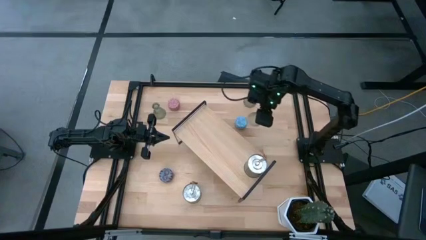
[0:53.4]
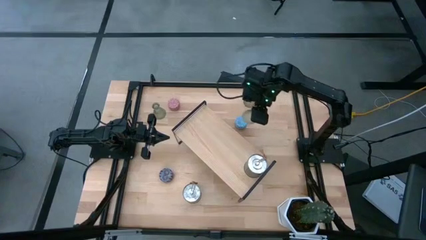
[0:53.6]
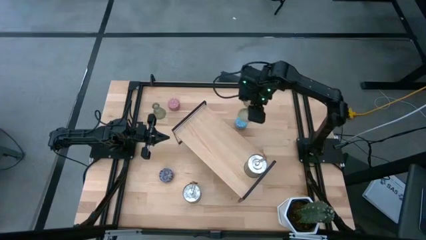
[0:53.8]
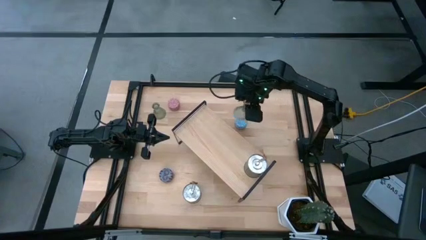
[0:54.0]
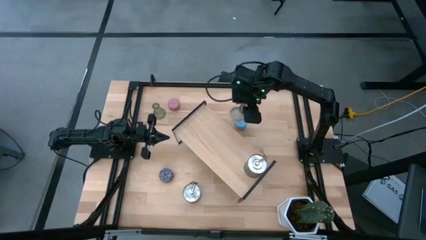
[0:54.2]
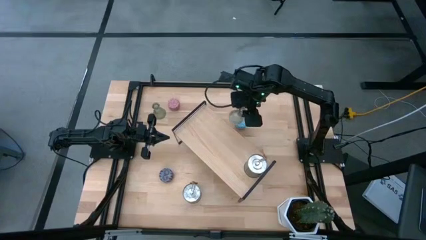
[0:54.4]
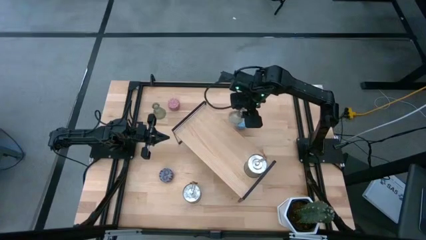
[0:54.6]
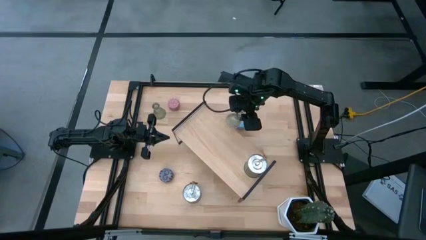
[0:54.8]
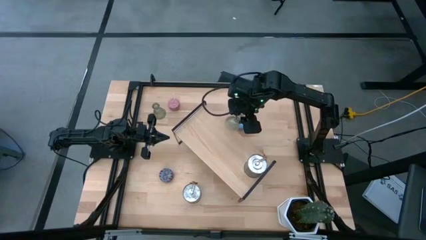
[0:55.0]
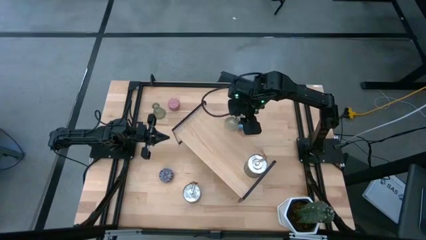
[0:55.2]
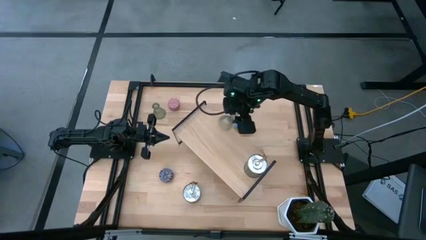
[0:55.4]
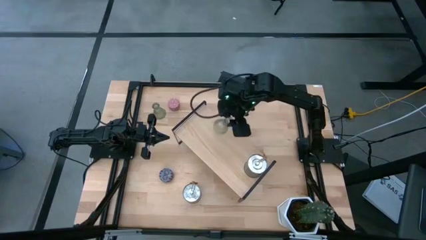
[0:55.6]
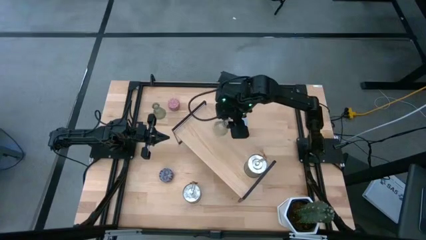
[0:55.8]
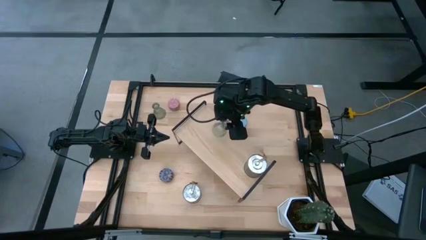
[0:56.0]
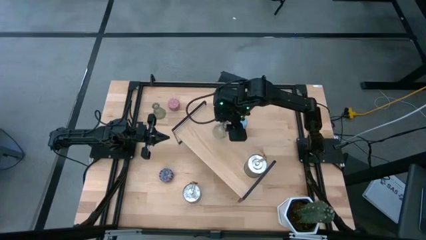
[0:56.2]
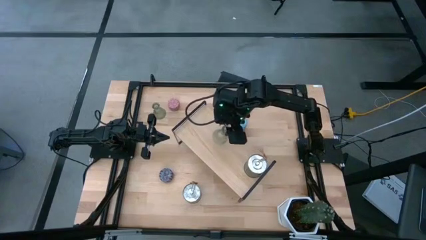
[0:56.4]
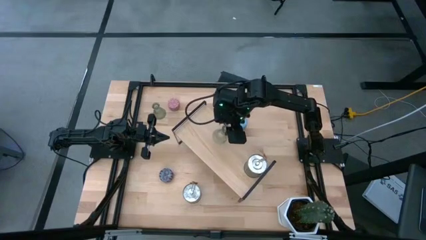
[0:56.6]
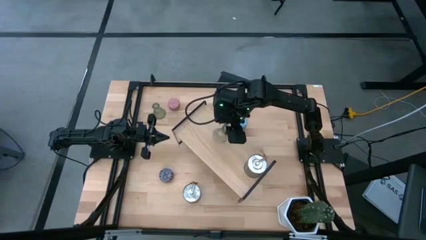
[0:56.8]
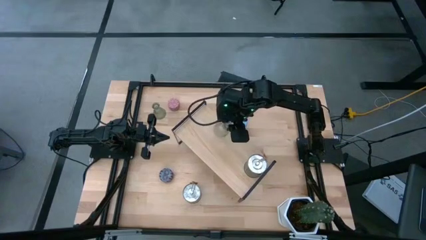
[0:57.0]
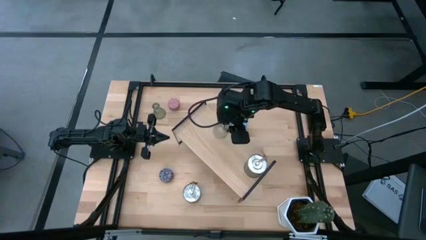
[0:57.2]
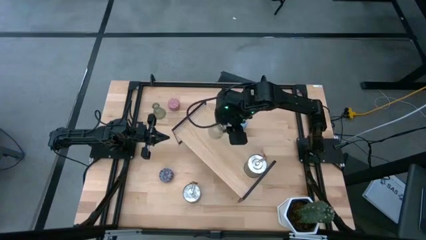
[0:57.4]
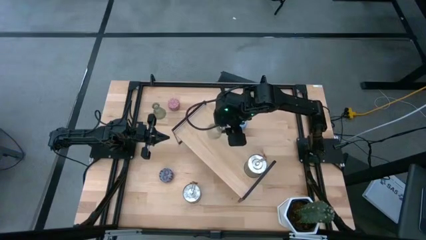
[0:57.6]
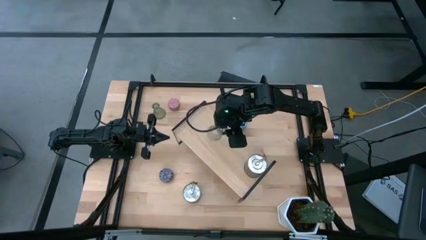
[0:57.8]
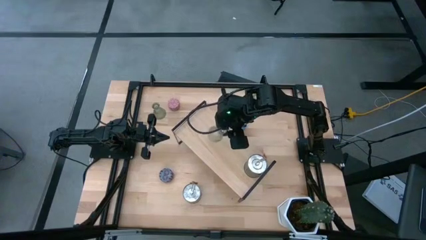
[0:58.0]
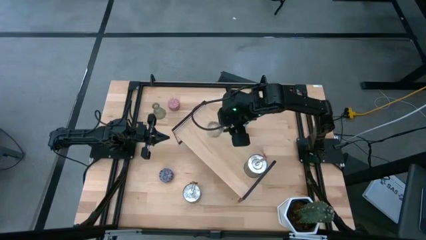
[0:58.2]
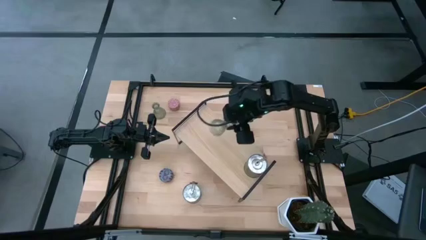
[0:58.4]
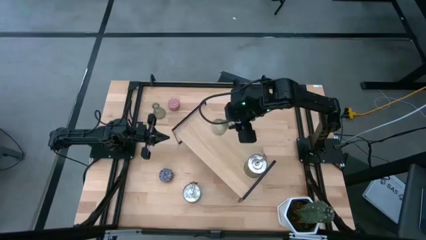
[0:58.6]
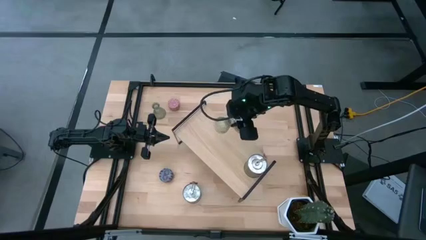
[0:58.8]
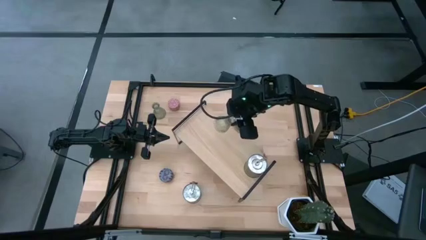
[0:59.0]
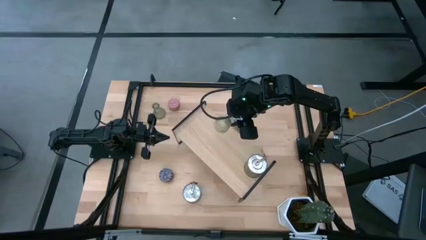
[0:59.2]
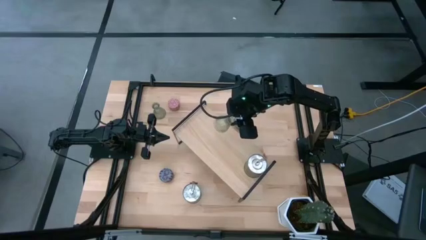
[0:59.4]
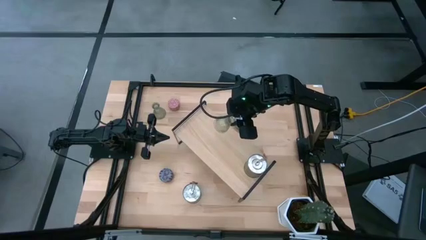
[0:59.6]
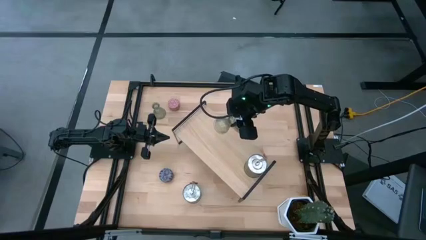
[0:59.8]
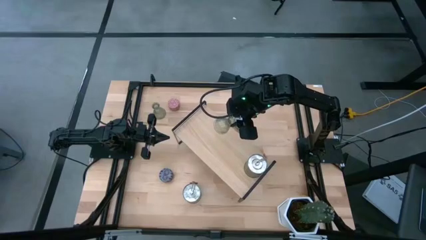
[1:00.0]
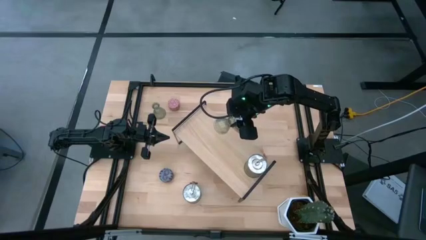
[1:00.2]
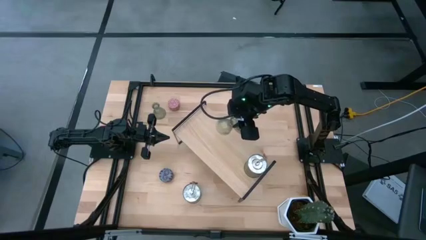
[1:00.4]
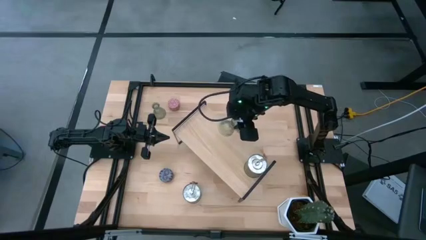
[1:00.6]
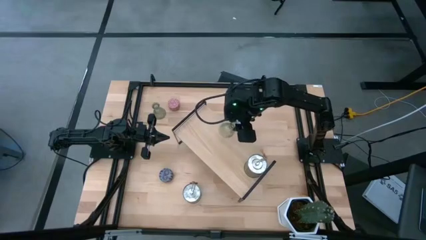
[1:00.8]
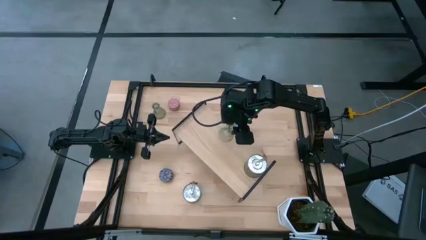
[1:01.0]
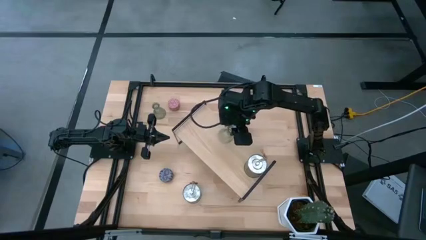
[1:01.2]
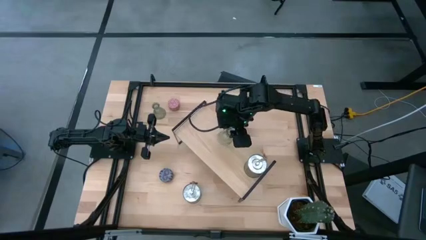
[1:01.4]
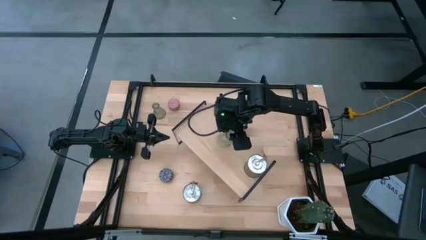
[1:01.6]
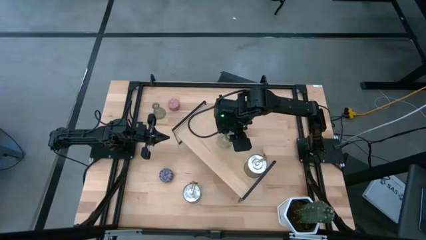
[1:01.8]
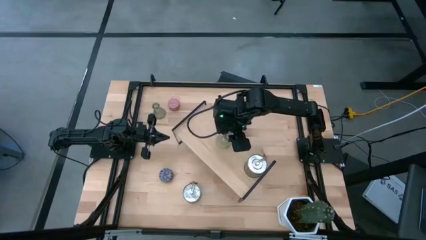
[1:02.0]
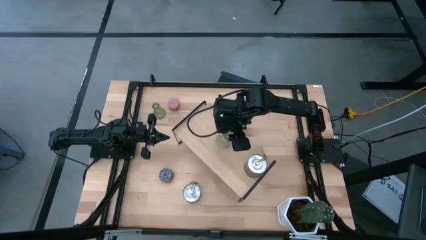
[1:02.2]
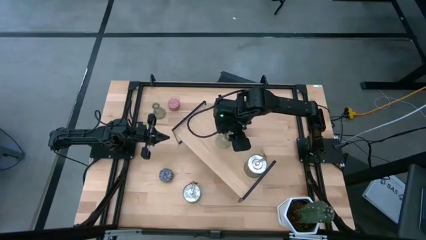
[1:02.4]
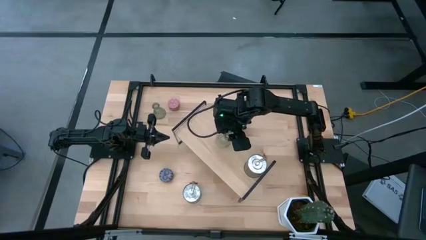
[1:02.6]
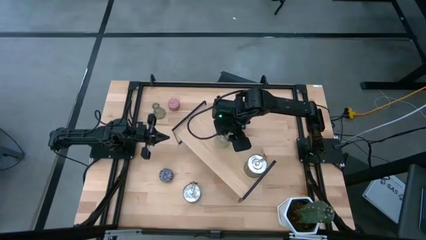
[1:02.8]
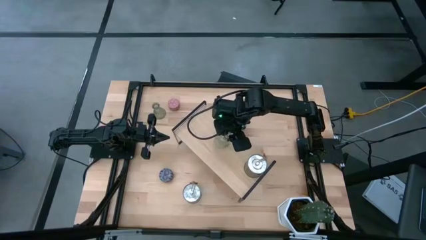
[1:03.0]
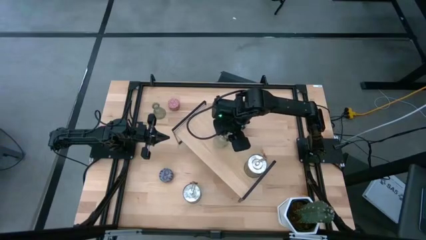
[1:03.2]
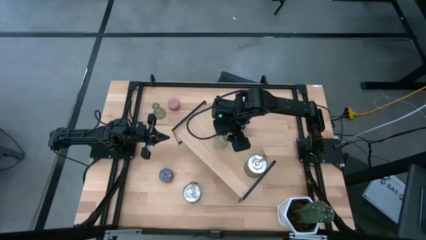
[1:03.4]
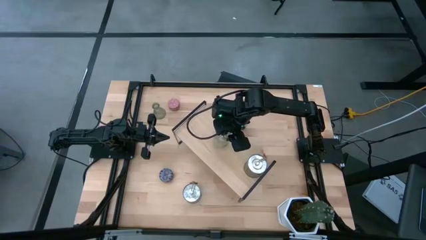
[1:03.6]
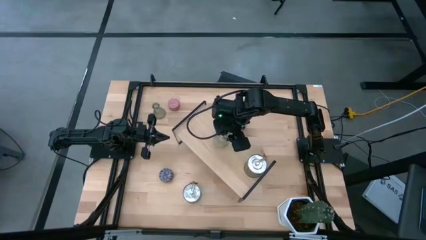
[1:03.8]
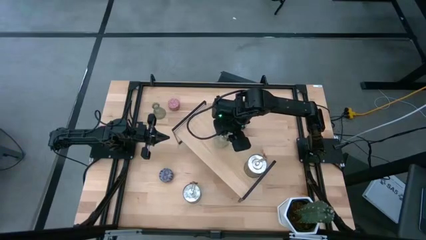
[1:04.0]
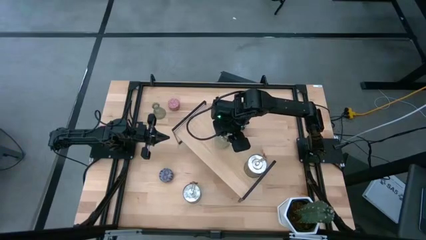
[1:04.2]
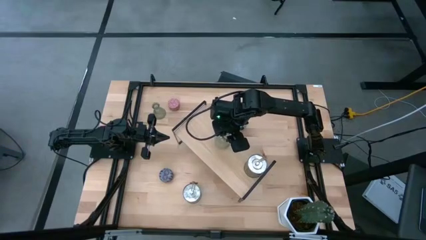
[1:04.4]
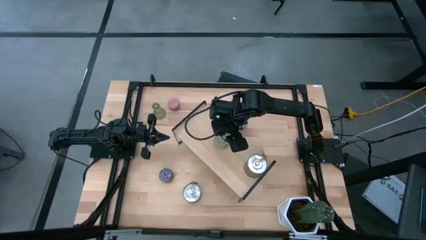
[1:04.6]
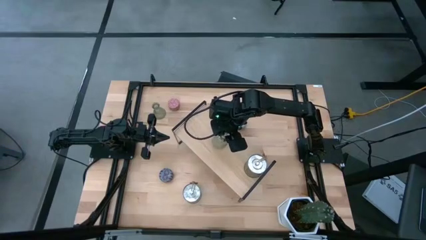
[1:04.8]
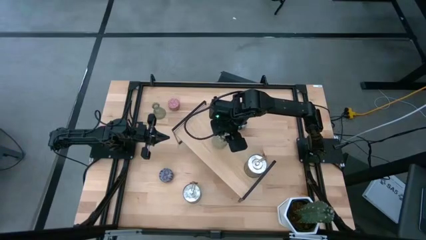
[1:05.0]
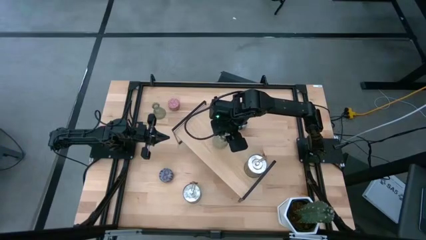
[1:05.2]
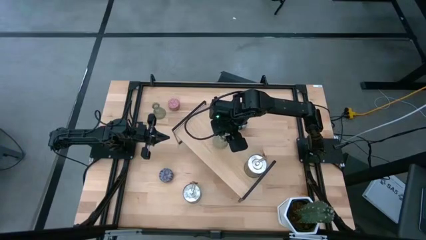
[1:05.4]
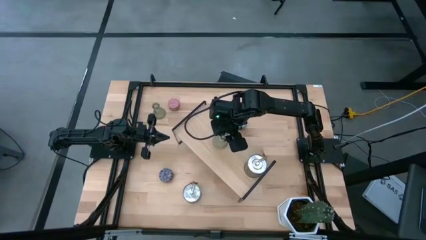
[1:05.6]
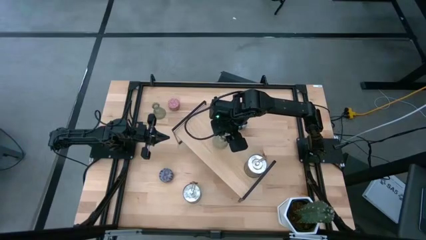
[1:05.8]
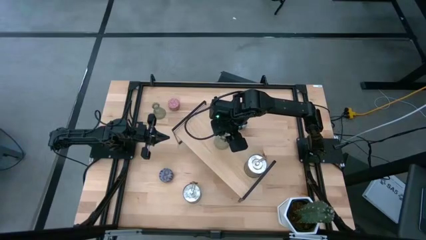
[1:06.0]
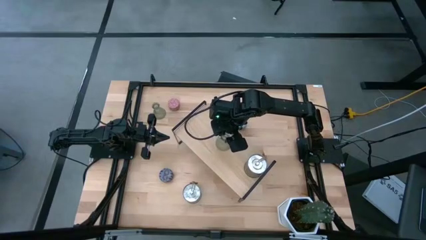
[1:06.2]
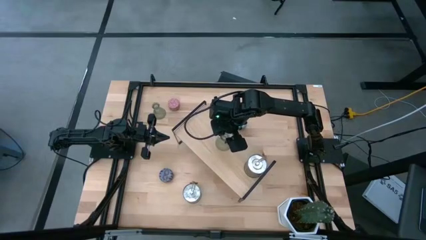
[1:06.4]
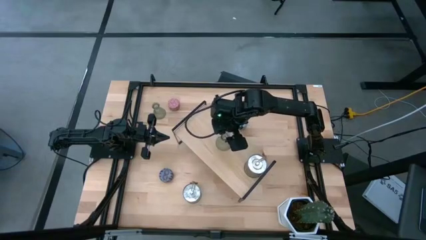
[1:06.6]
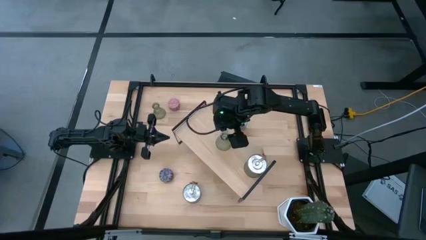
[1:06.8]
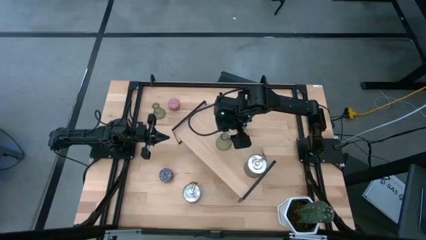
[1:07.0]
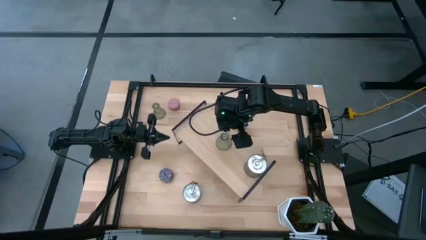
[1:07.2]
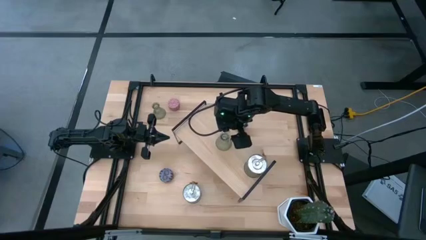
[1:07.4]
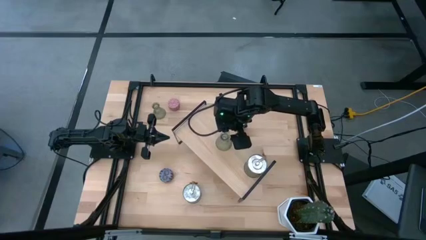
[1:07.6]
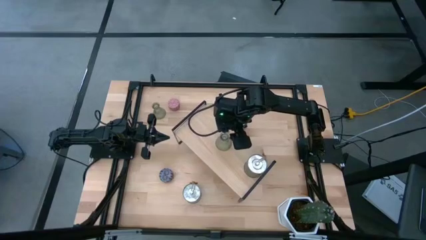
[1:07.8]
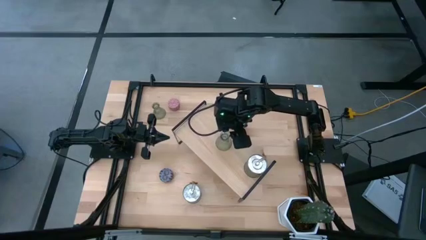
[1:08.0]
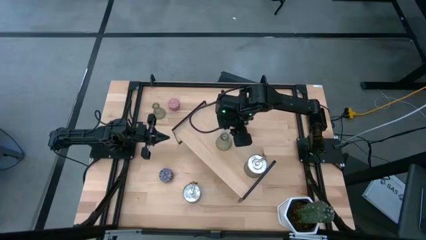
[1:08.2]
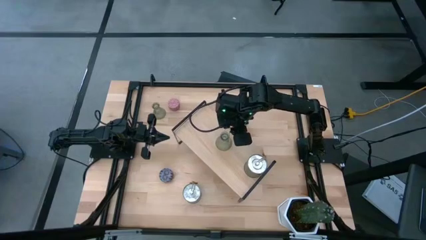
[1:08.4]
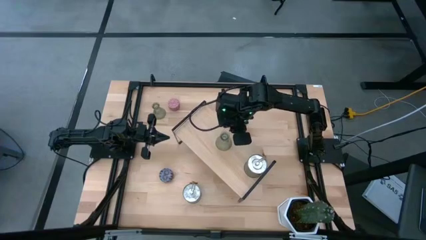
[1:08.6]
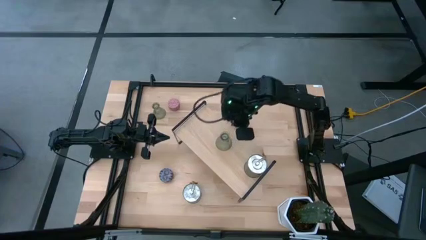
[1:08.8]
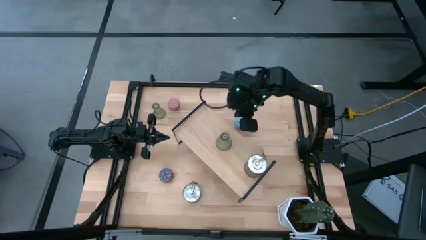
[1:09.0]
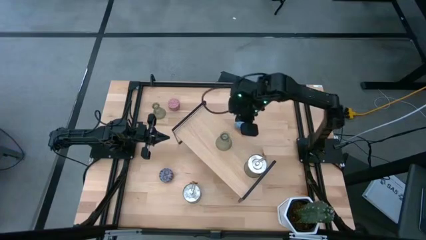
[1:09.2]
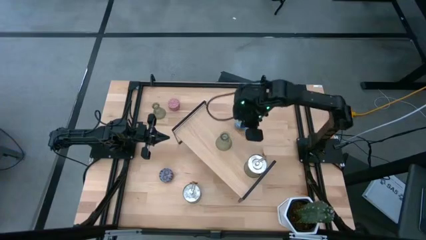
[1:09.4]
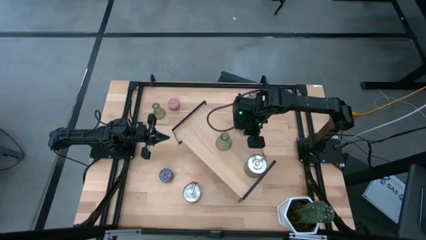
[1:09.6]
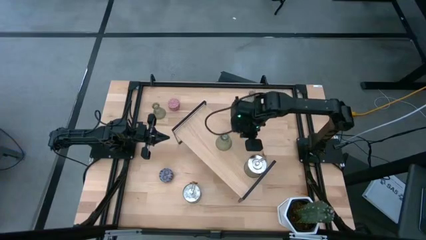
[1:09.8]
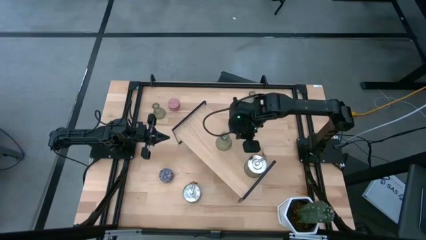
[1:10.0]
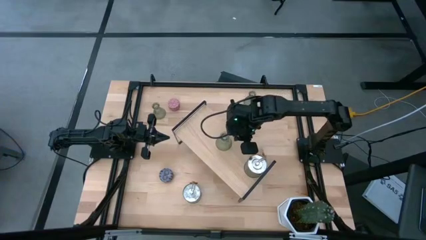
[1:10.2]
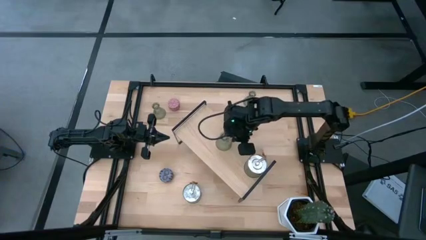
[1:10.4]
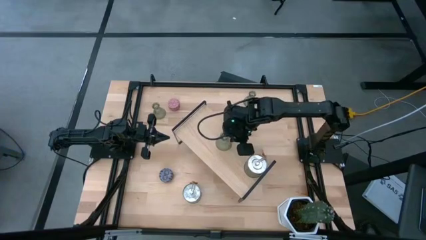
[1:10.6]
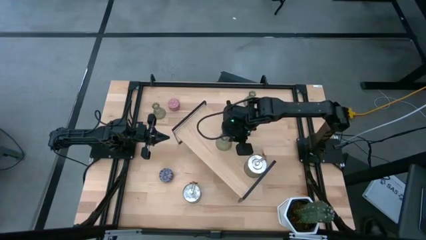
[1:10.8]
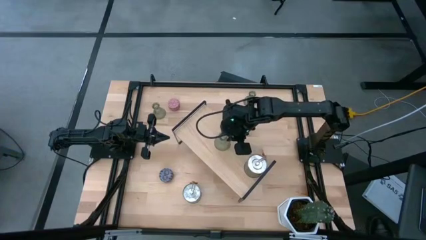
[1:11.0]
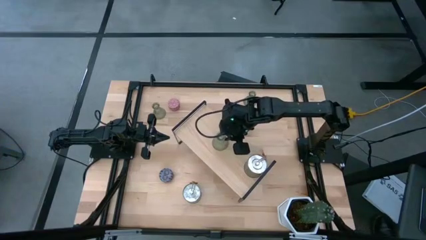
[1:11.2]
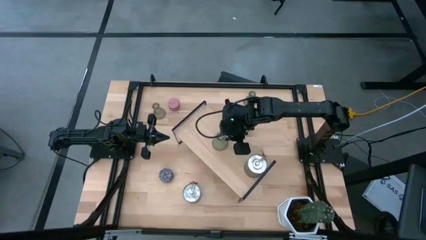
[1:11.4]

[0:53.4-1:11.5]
Task: Pick & Place candle stick holders
Put the right transparent candle holder on the shelf
